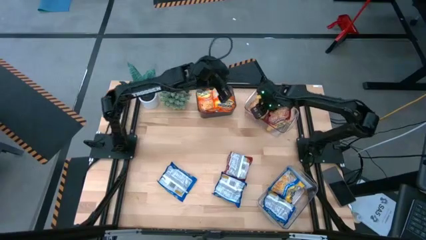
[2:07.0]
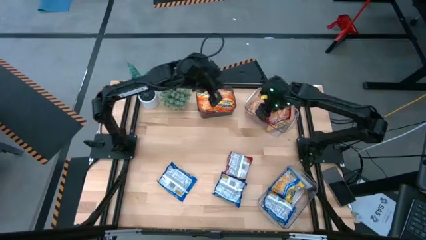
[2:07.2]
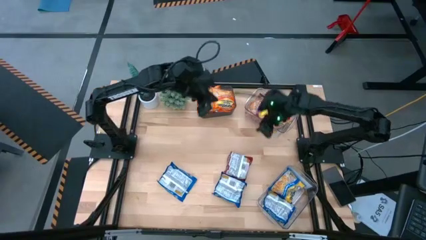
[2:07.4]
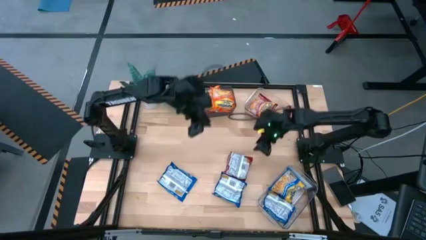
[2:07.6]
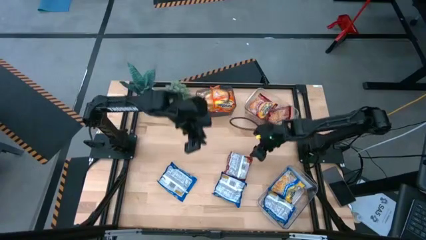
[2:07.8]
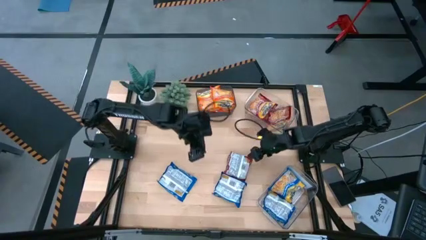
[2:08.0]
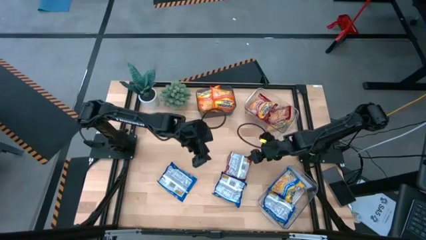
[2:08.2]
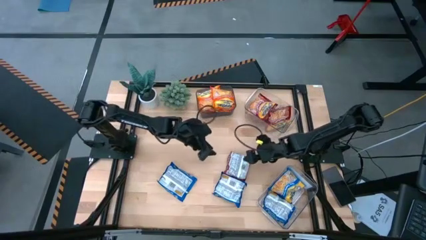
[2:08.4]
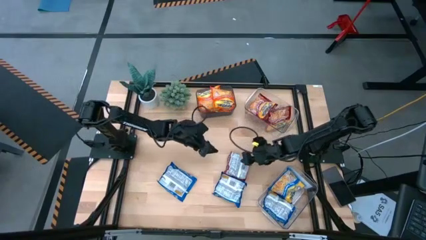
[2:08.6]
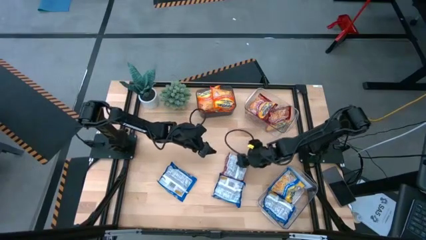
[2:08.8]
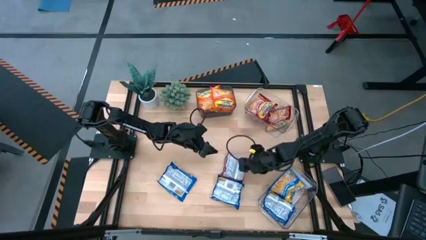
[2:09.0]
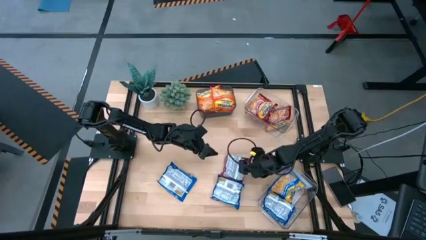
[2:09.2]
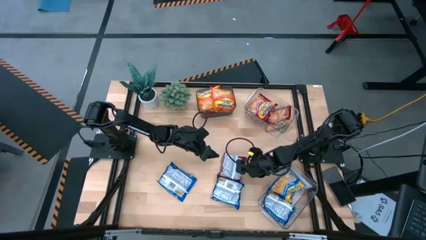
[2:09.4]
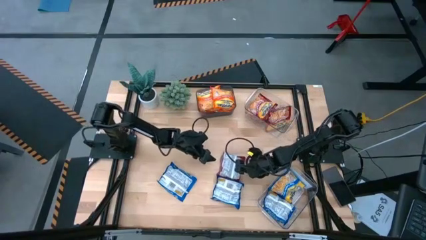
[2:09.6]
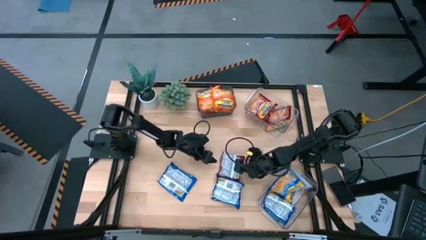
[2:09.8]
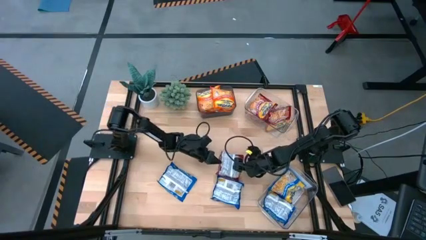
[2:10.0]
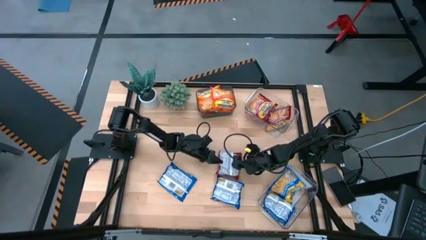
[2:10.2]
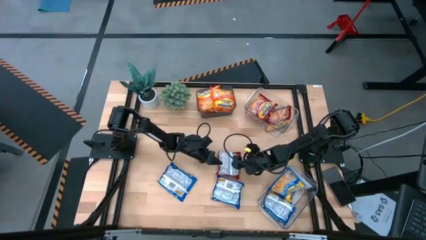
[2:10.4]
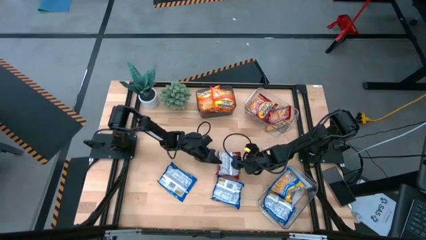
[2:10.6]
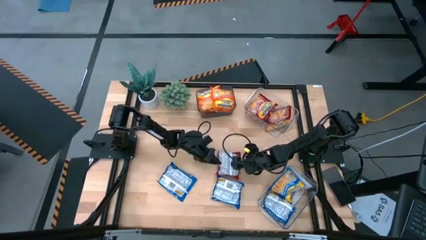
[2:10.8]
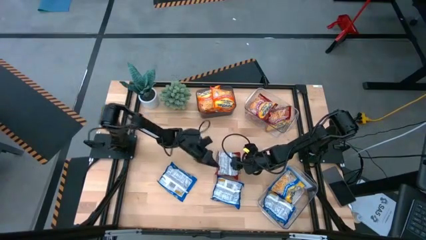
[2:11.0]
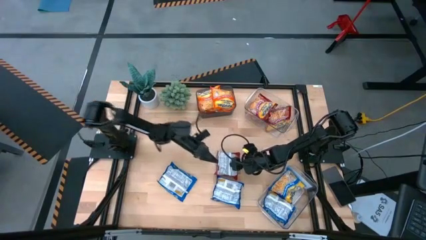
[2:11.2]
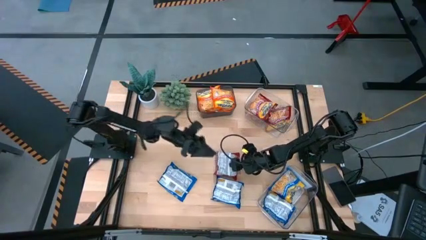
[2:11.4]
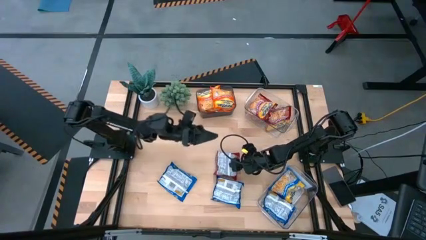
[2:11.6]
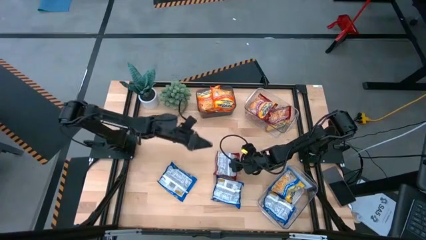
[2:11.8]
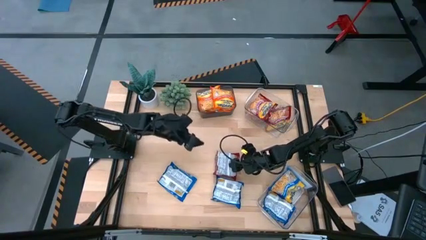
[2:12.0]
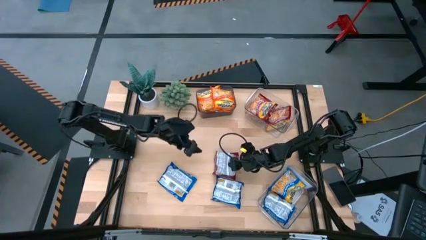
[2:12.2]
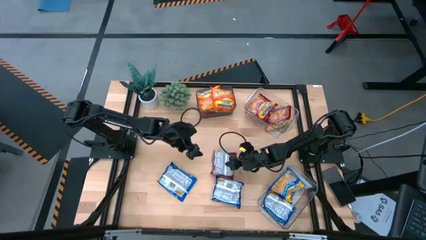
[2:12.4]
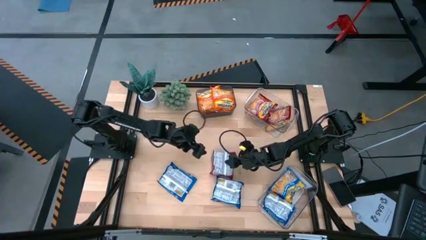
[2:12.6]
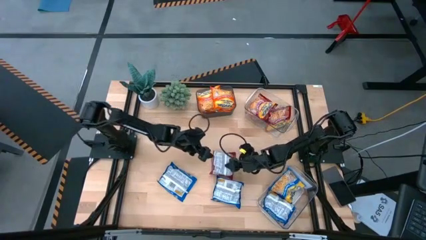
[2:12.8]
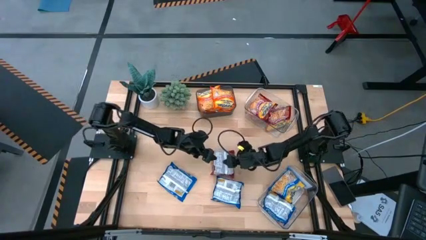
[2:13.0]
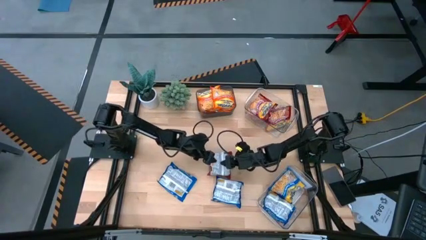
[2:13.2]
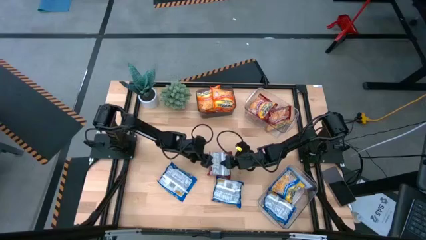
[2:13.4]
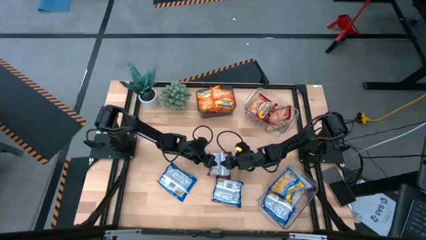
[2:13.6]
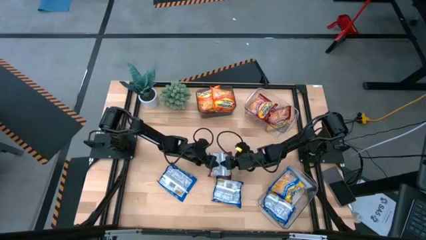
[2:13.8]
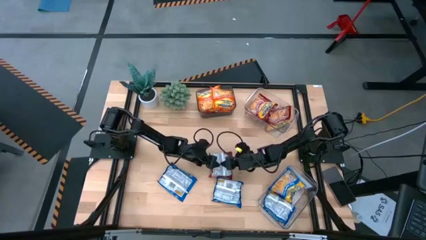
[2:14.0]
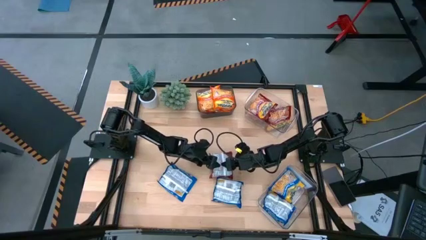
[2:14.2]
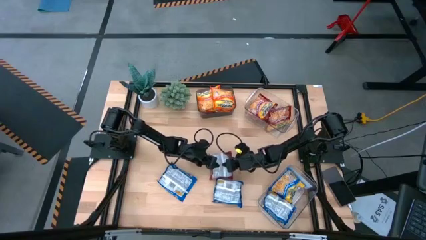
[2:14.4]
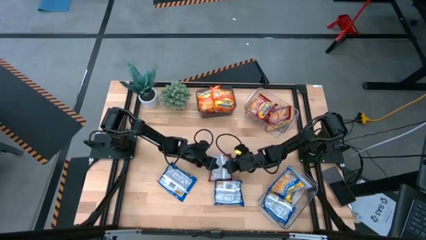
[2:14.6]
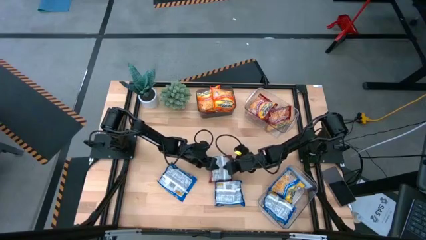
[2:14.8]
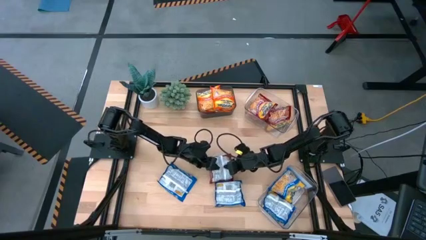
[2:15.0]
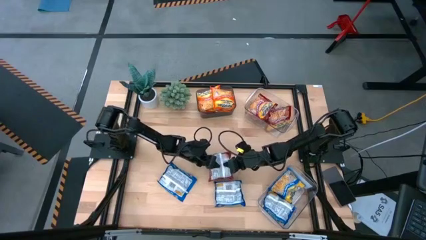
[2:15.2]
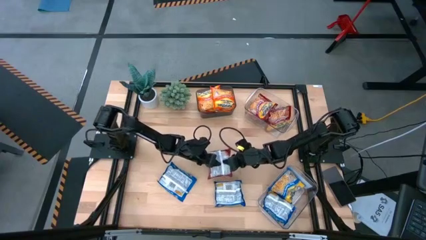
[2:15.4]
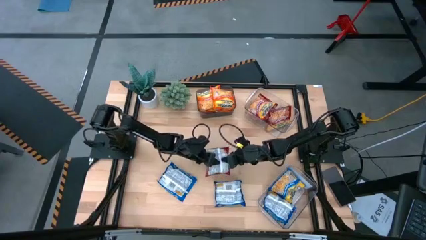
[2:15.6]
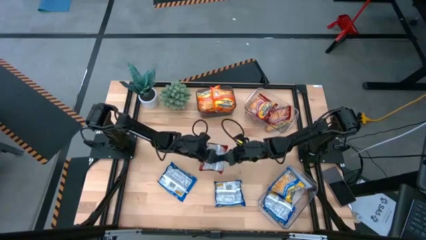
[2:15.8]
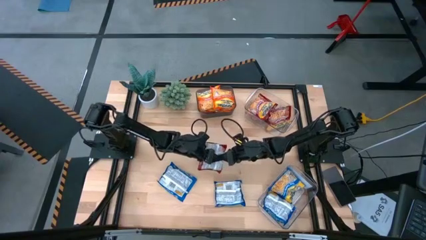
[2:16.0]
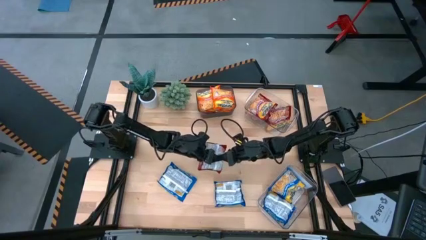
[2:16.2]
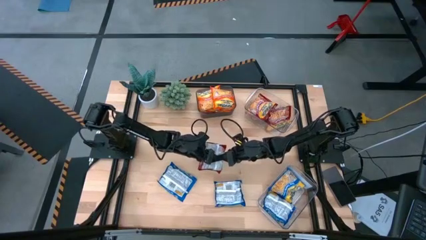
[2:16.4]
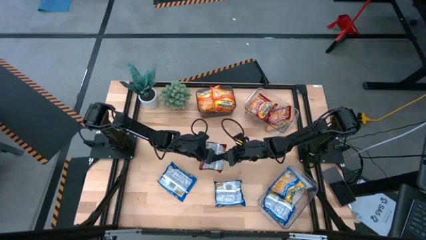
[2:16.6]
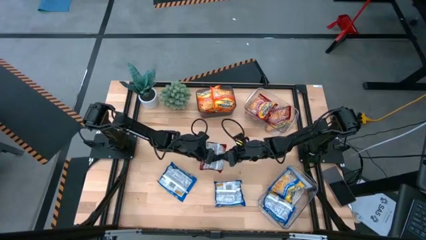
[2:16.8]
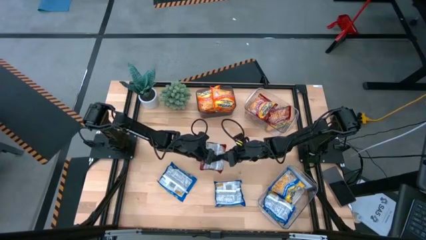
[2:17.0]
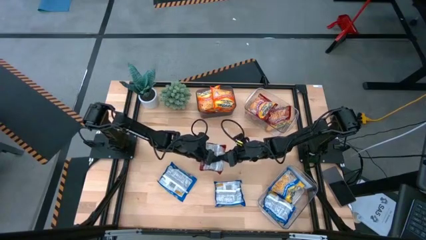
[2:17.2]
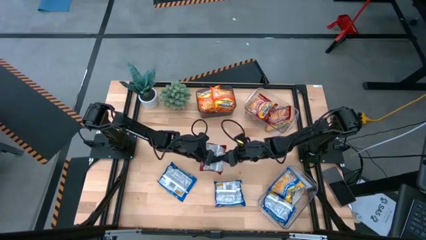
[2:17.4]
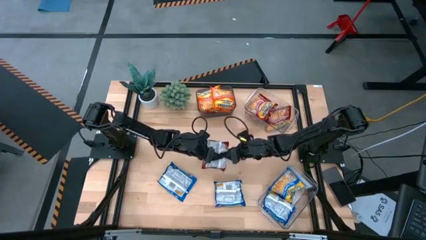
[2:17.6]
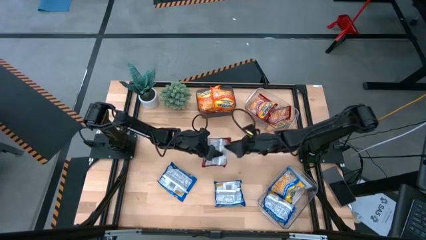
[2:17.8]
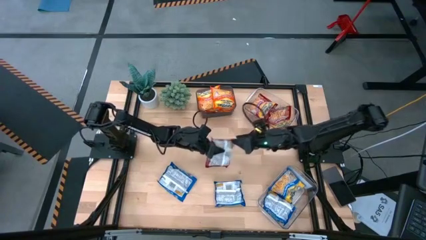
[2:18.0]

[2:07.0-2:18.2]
Task: Sort Maruchan noodles
Put the red noodle pack into the top transparent bin

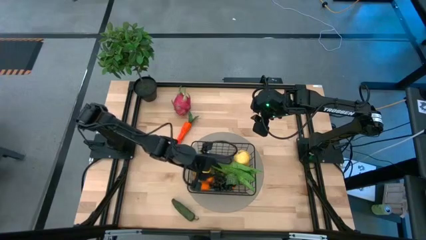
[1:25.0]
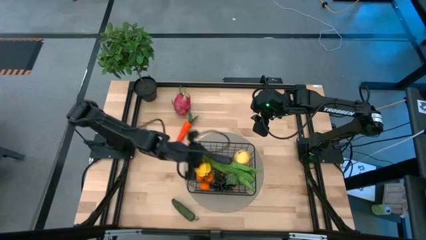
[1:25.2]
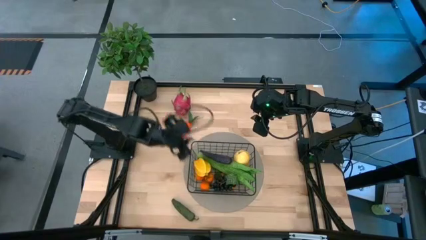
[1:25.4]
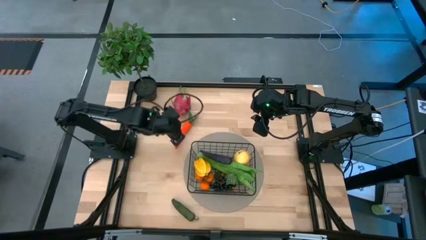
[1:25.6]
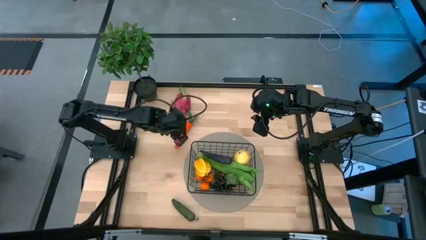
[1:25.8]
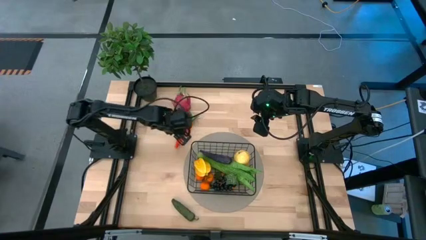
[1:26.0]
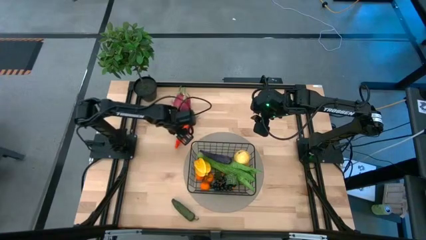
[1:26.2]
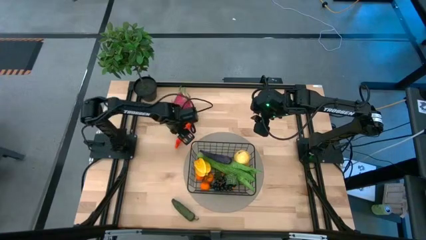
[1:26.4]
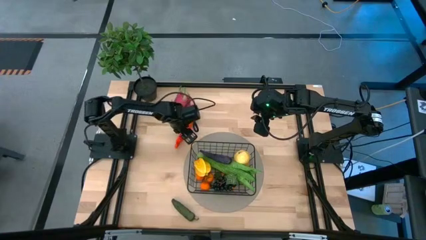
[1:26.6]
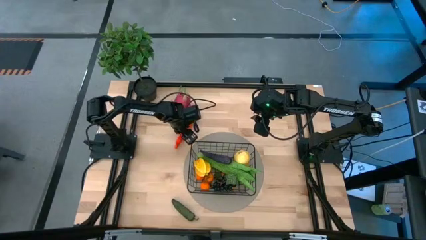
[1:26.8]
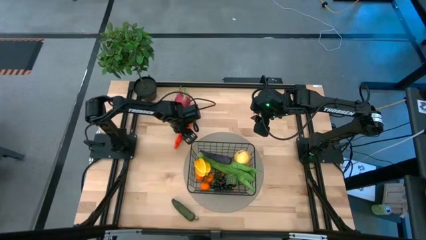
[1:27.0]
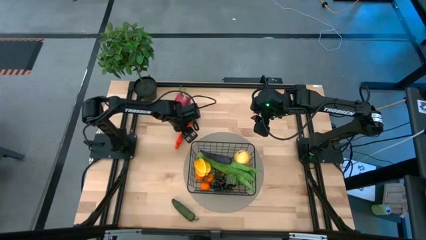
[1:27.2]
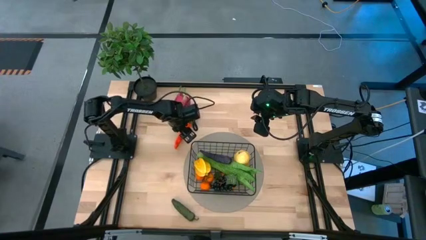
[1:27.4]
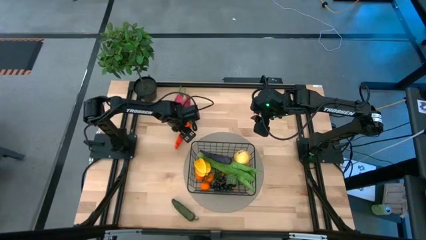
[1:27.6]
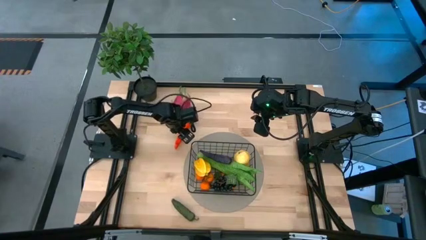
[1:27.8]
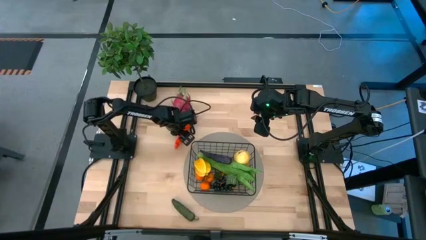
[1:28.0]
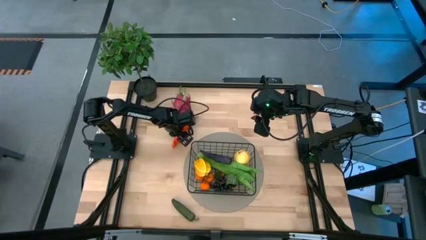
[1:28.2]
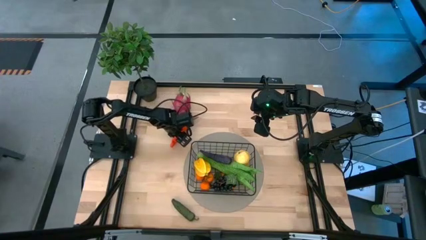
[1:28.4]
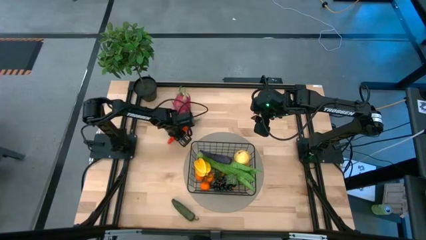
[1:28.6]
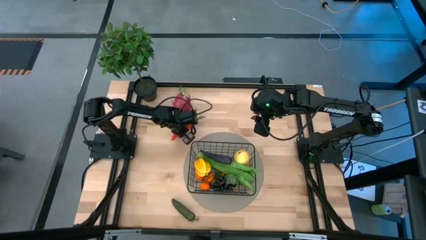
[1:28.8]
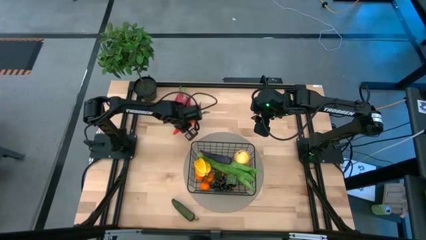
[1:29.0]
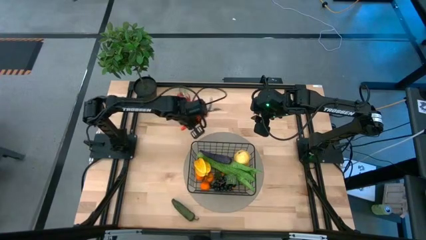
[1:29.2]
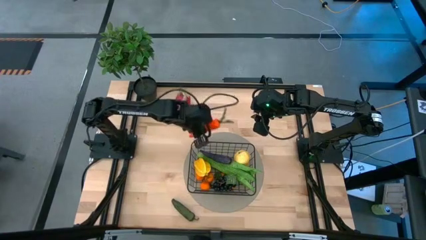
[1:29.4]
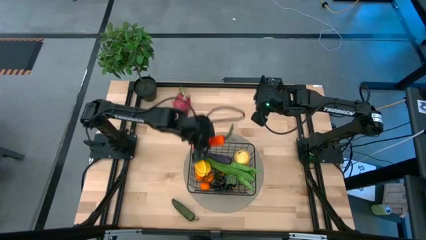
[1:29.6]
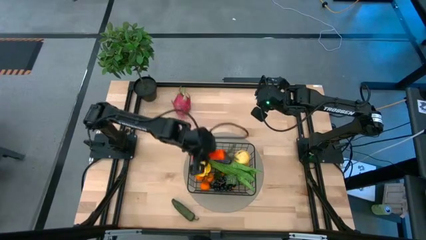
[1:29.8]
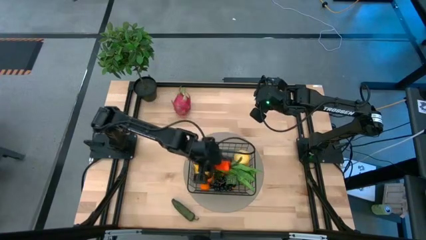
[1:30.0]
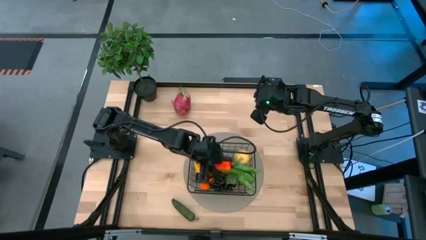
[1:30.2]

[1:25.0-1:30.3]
Task: Build produce basket
Put the carrot into the black basket
